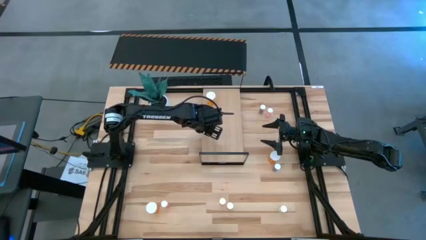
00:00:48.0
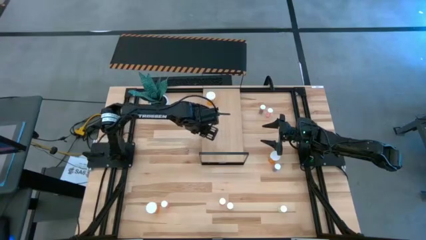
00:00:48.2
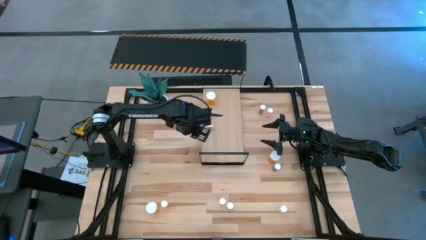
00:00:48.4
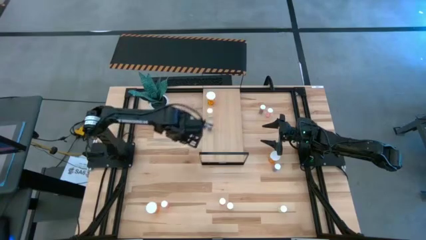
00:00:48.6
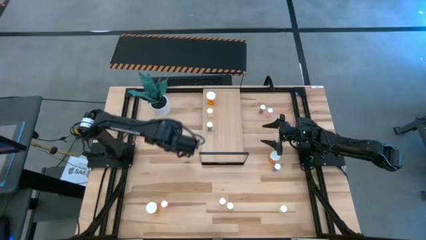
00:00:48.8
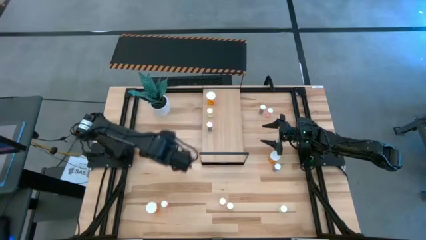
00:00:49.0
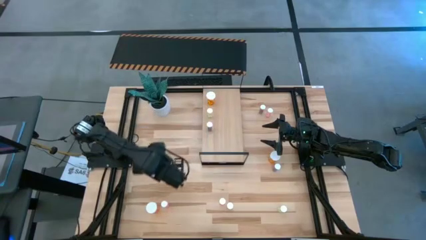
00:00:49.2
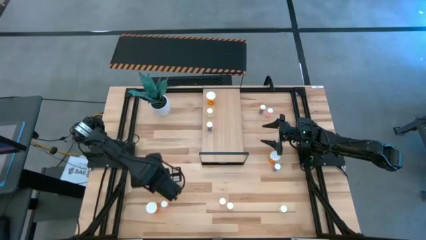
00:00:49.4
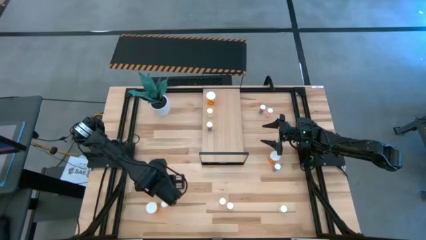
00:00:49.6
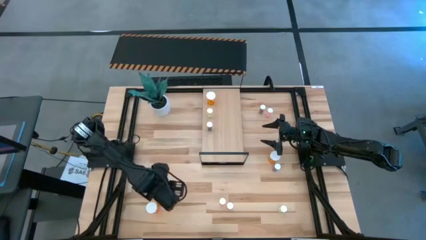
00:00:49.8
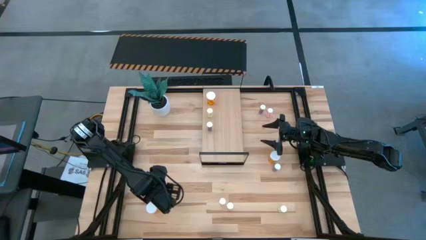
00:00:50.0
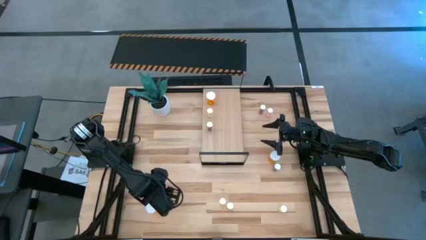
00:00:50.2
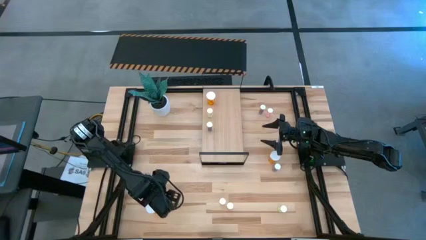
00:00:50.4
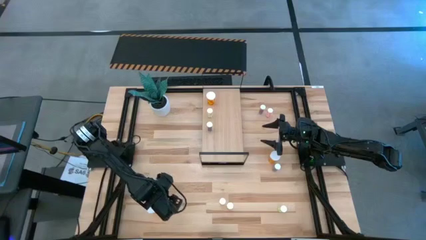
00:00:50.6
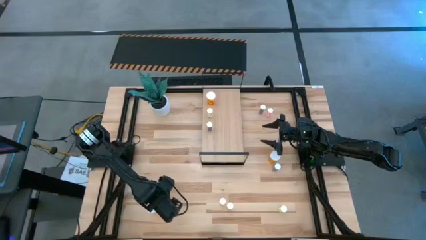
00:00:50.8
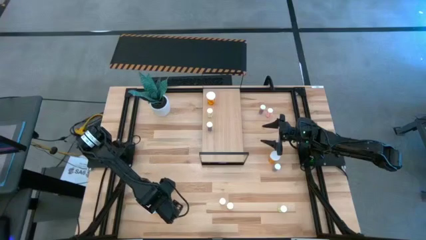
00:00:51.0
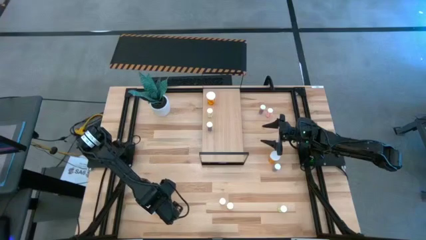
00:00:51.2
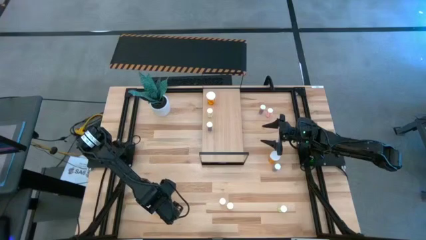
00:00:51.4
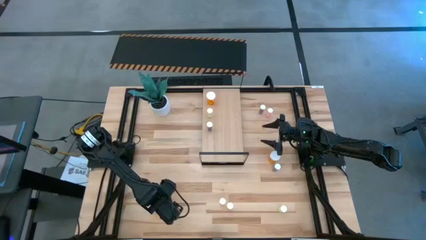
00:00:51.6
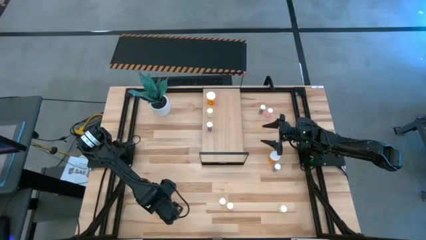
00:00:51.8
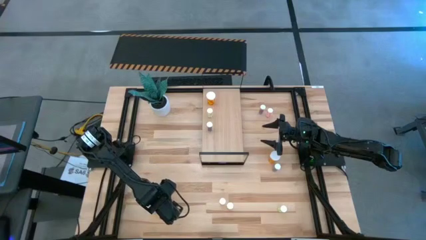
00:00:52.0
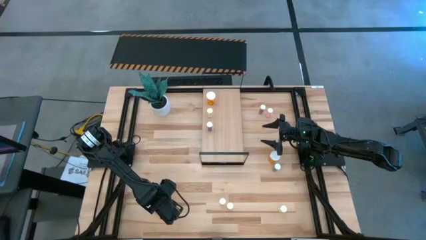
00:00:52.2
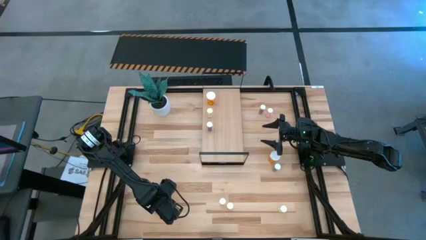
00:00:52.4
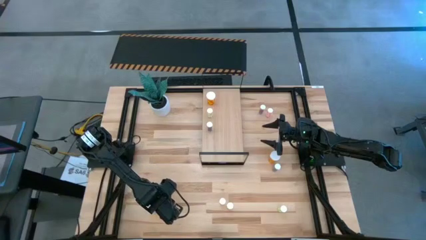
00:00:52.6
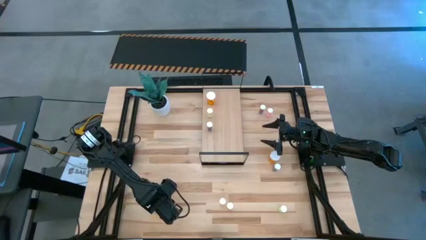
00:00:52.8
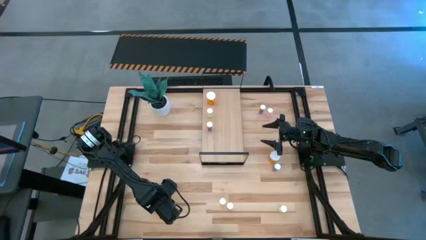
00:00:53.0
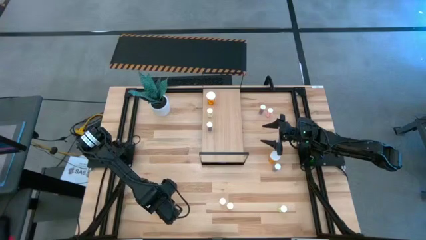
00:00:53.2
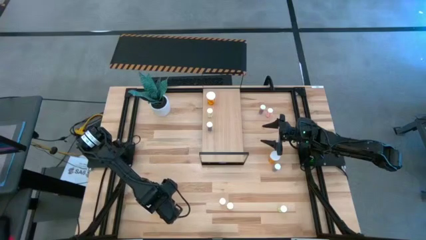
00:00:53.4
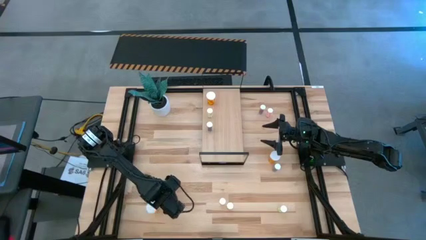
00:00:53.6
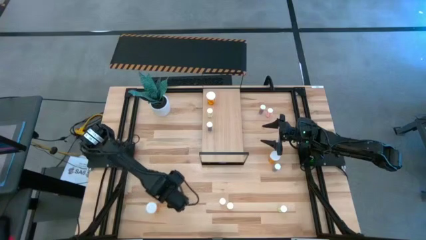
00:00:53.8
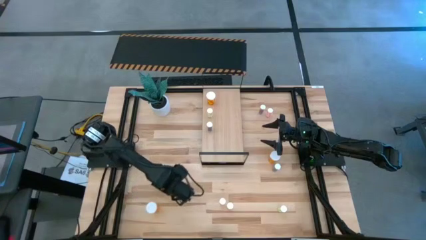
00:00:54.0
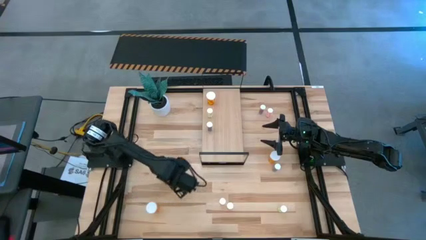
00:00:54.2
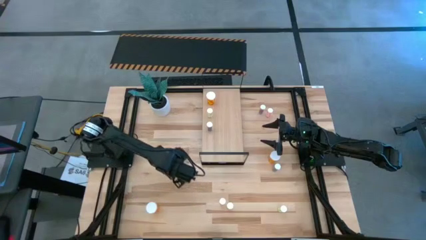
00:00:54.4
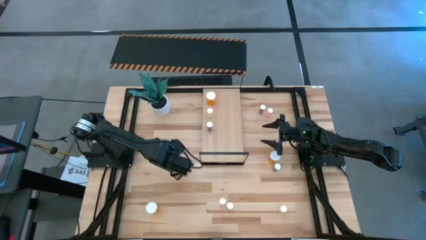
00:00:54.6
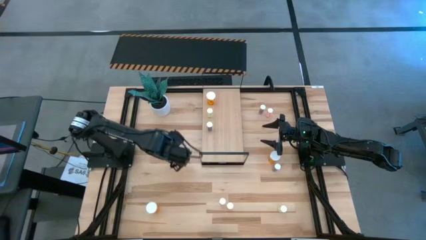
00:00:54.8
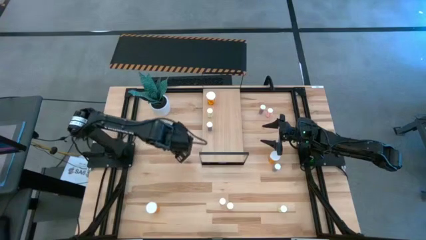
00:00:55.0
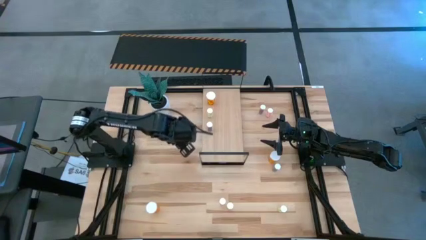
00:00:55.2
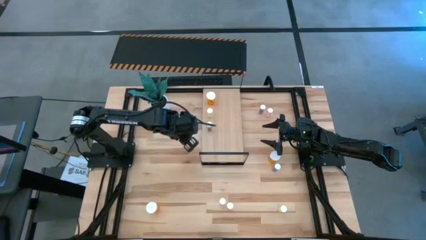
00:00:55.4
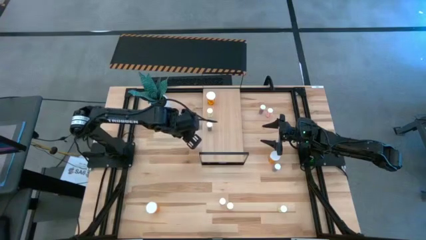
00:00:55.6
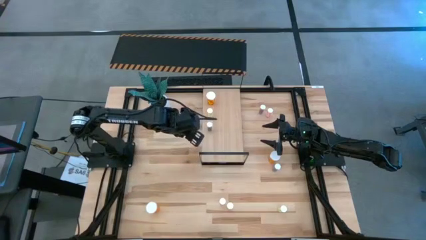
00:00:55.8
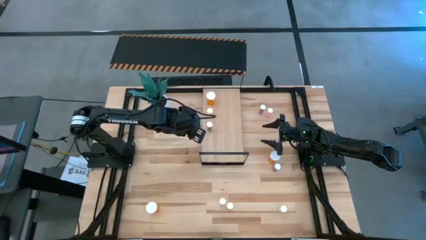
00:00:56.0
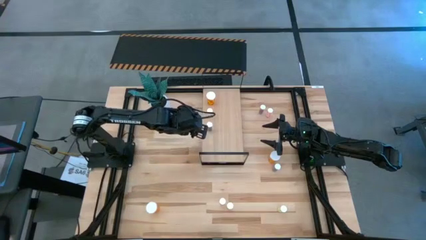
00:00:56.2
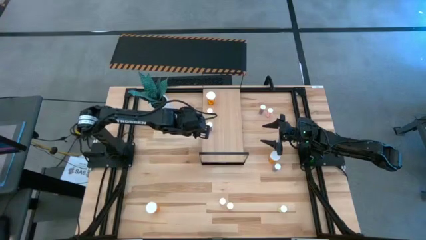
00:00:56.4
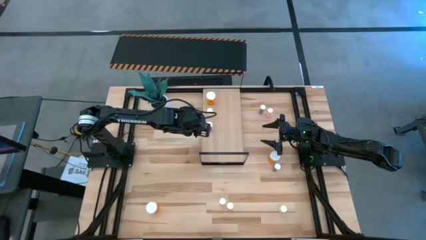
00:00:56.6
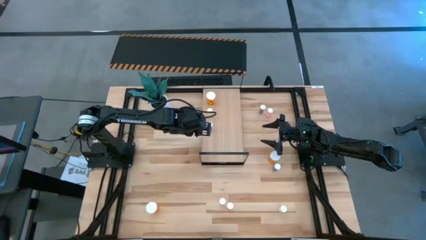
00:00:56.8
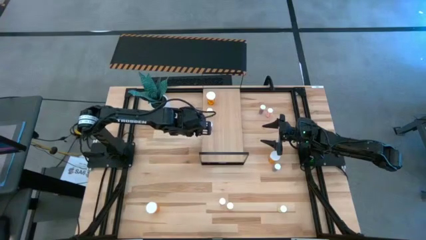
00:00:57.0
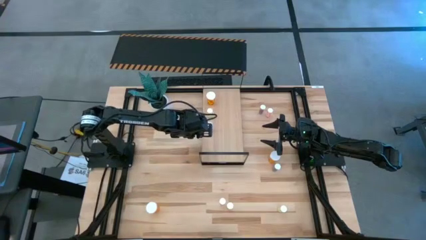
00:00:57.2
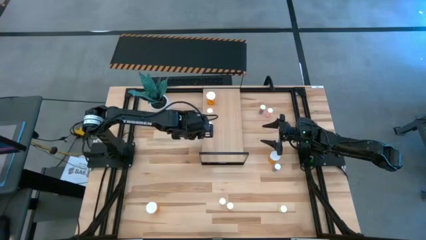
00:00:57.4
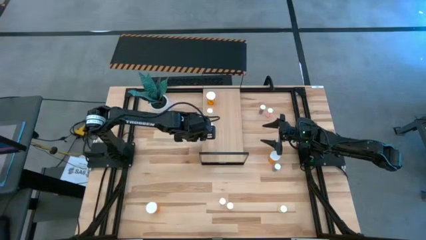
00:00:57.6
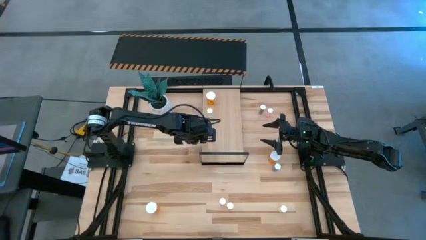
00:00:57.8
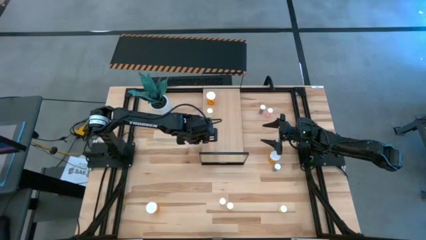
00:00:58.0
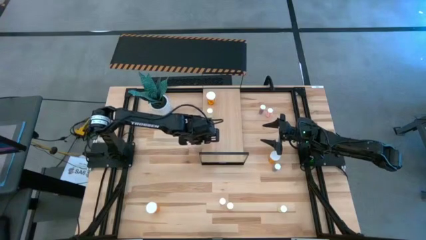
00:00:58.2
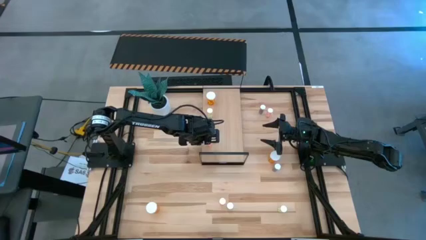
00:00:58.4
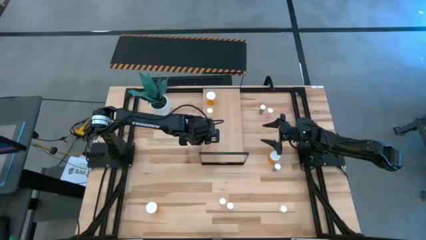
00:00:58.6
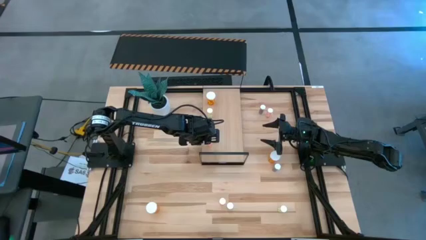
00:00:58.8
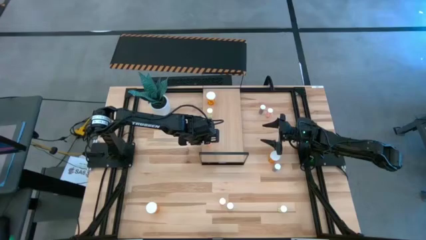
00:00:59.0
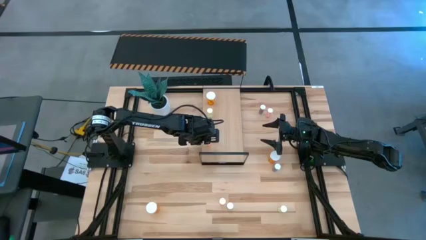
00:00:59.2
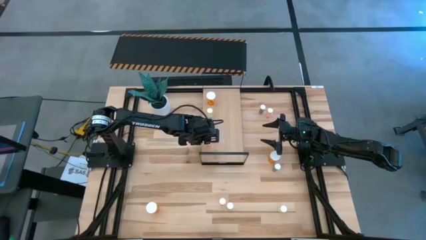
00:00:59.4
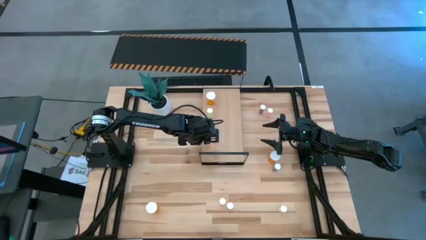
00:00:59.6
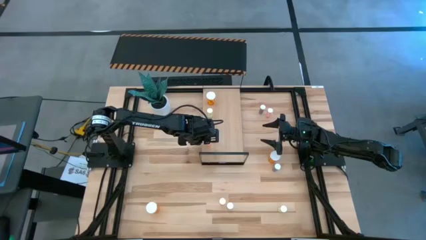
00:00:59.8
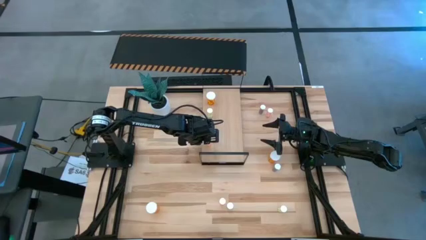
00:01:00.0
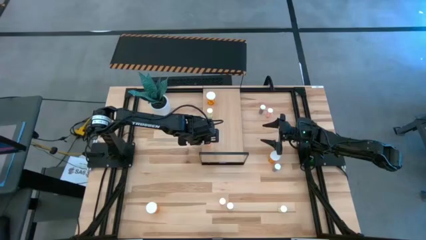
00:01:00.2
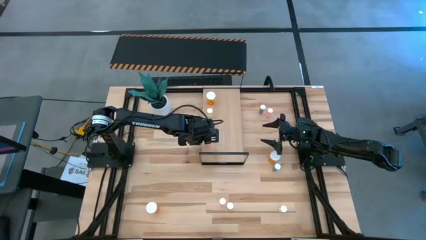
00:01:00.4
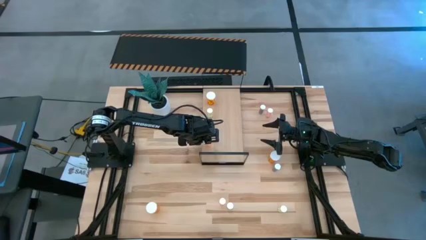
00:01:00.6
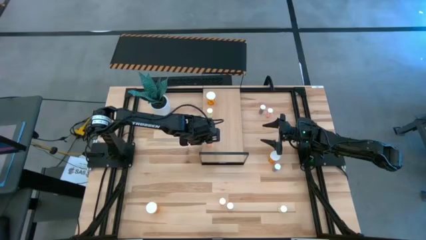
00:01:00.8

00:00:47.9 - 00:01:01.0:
Task: Pick and place medicine bottles onto shelf by color
Put the bottom left small pink pill bottle on the shelf

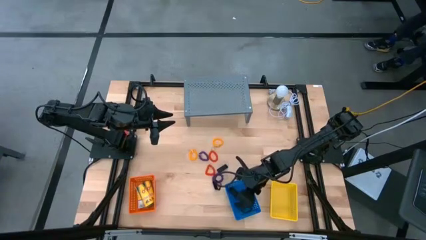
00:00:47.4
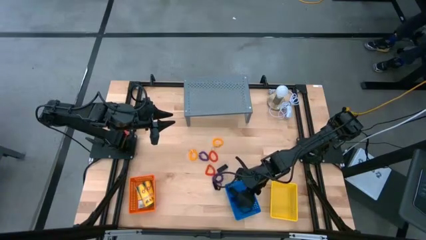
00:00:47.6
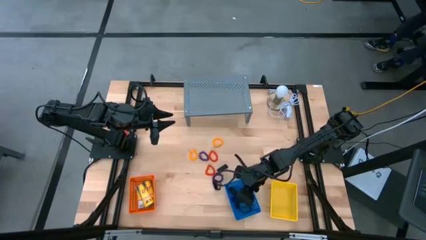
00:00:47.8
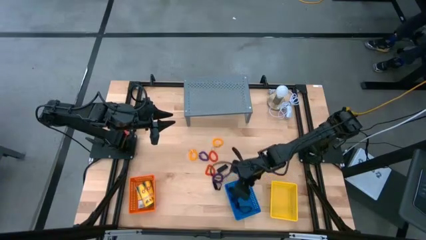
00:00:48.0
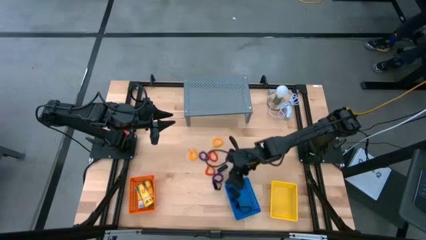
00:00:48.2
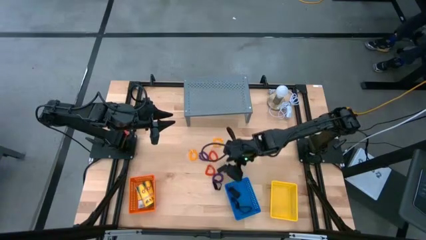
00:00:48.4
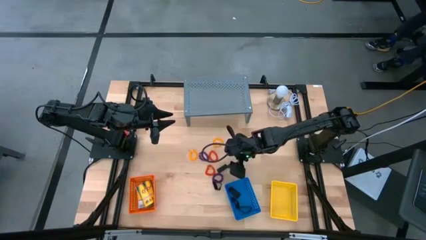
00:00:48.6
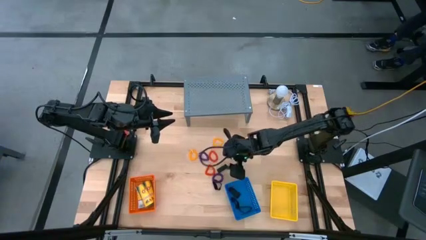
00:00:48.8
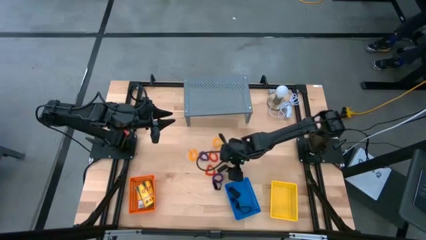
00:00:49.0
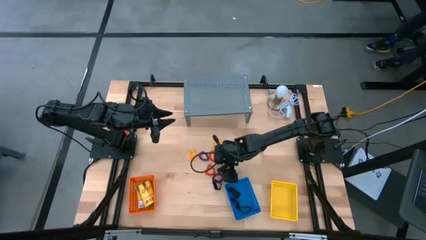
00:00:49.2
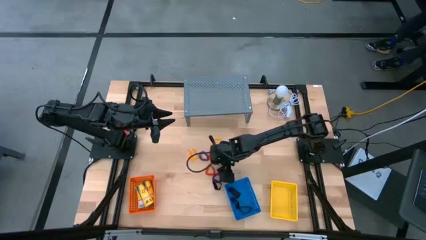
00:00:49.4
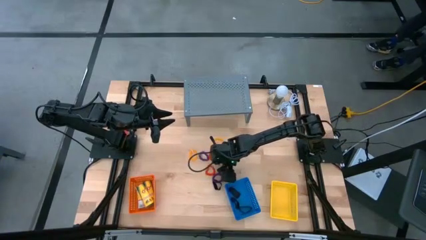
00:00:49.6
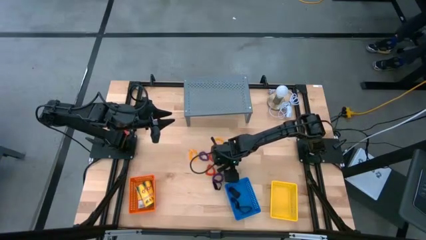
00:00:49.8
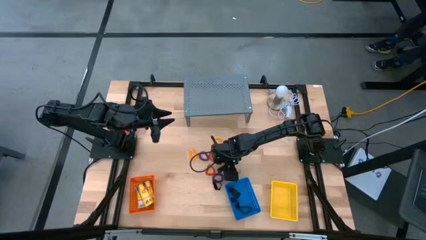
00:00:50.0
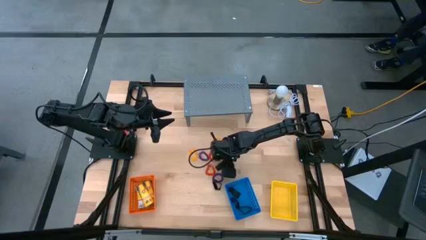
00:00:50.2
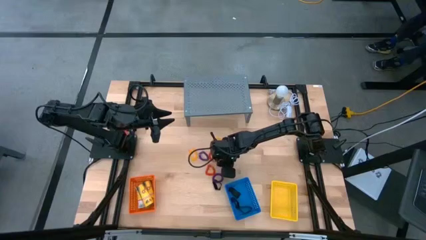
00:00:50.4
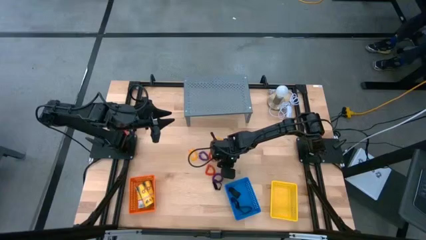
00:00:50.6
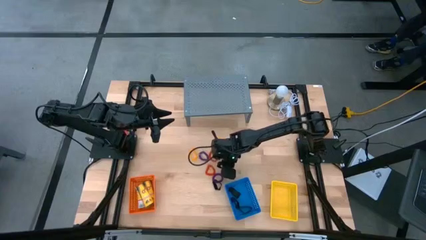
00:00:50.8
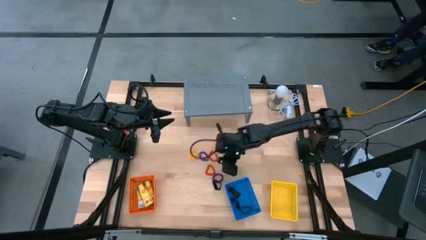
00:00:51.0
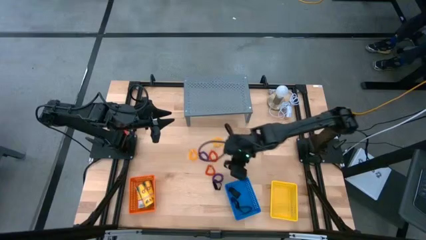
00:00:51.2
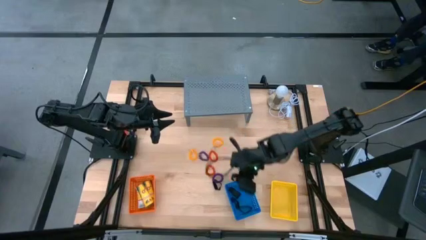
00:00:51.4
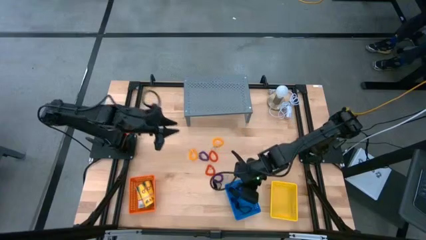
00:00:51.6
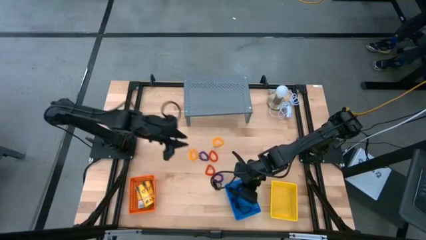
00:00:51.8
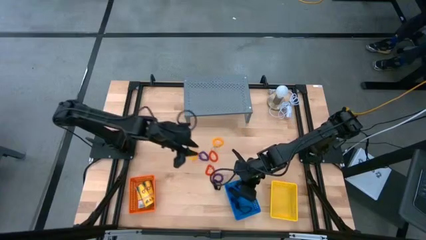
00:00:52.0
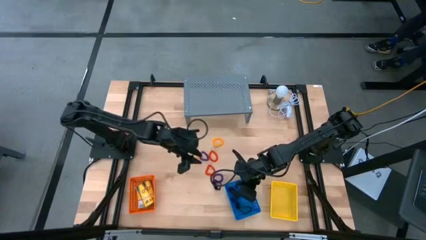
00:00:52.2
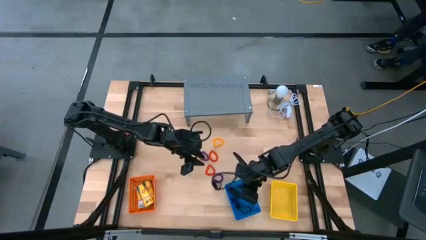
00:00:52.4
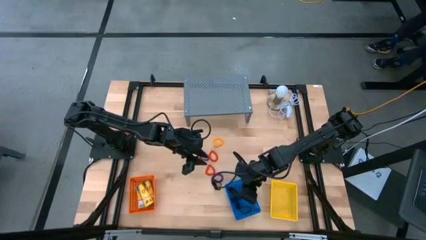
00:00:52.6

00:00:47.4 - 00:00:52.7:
Task: Pick & Place Office Desk Supplies
Put the black rubber band into the blue bin
